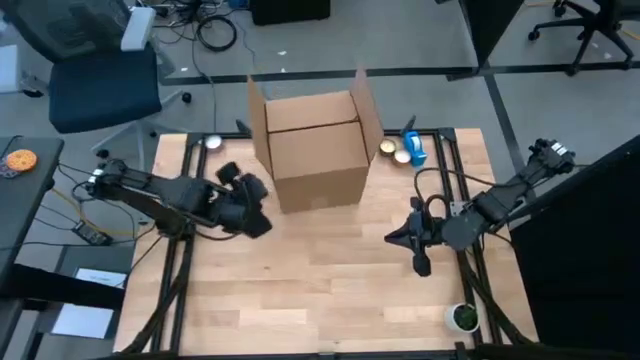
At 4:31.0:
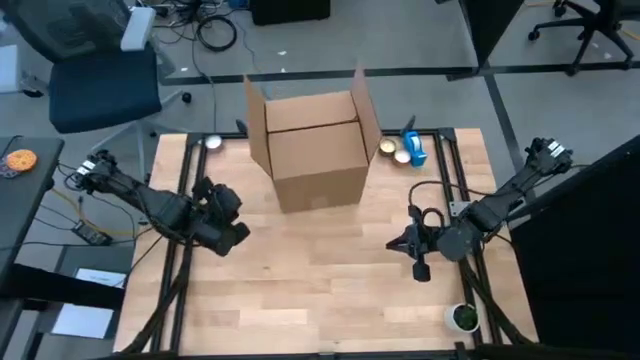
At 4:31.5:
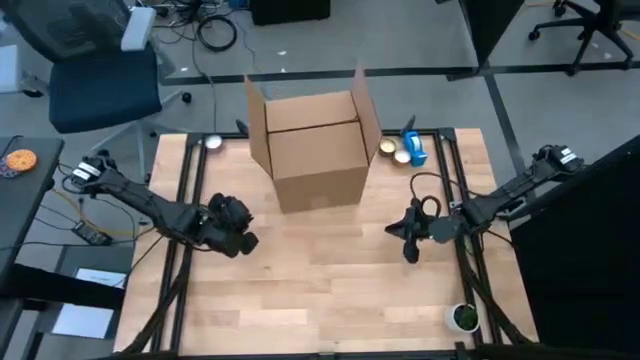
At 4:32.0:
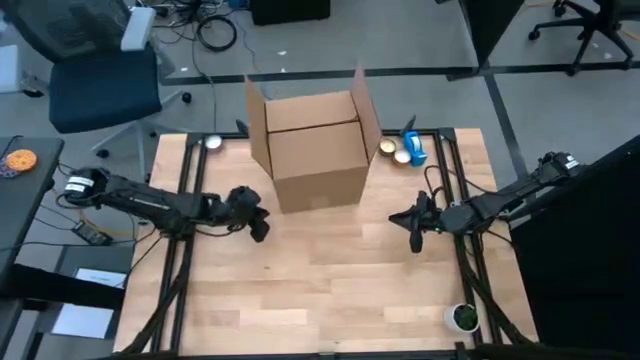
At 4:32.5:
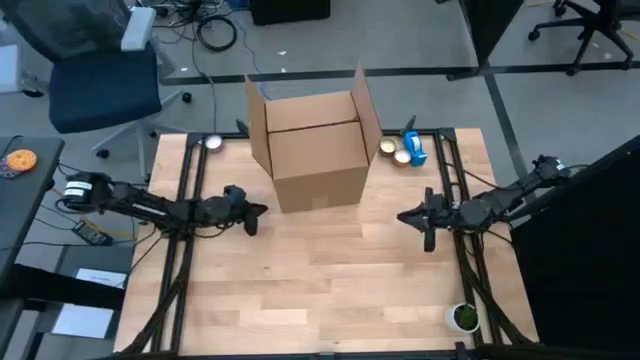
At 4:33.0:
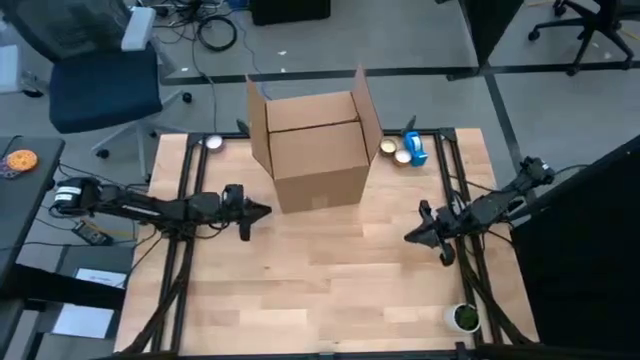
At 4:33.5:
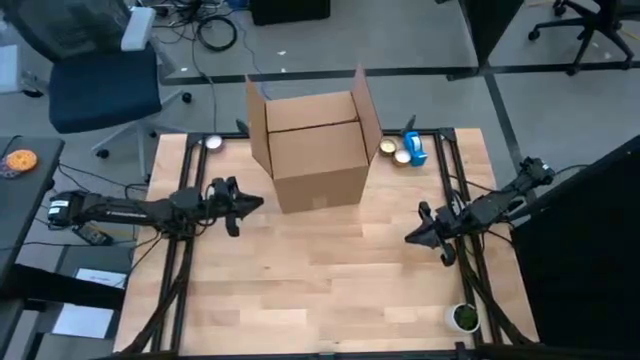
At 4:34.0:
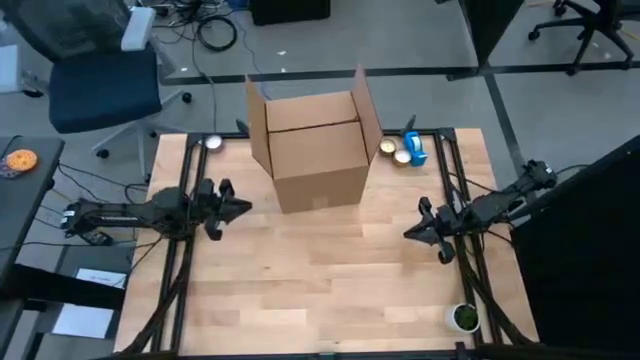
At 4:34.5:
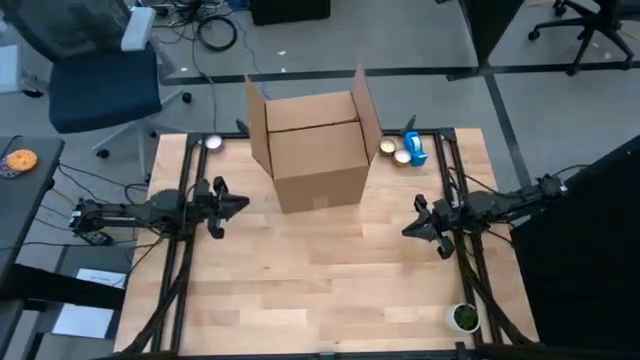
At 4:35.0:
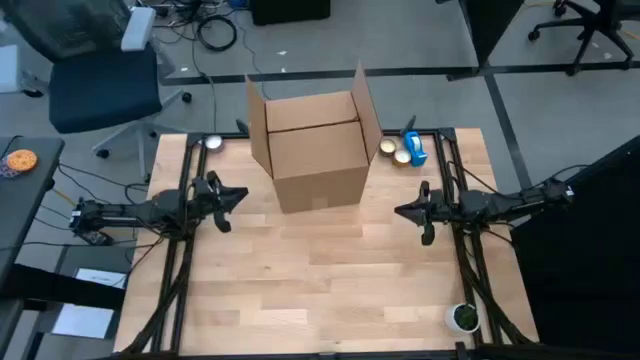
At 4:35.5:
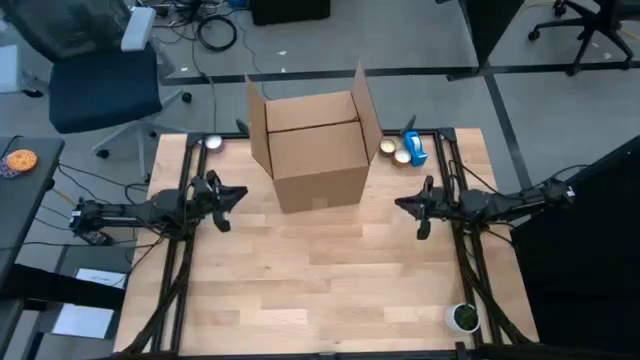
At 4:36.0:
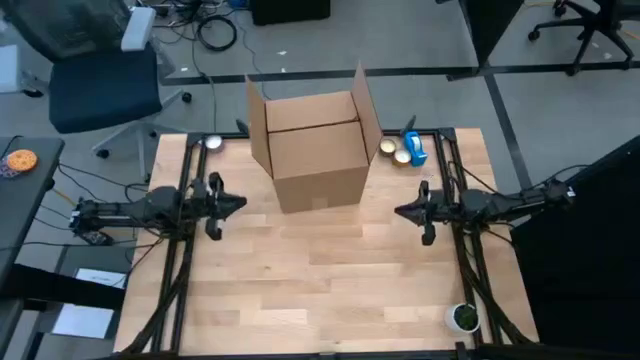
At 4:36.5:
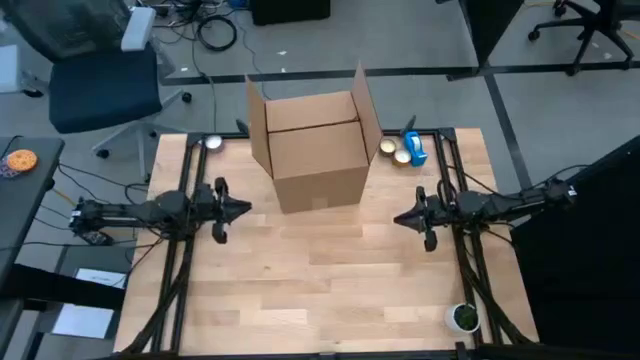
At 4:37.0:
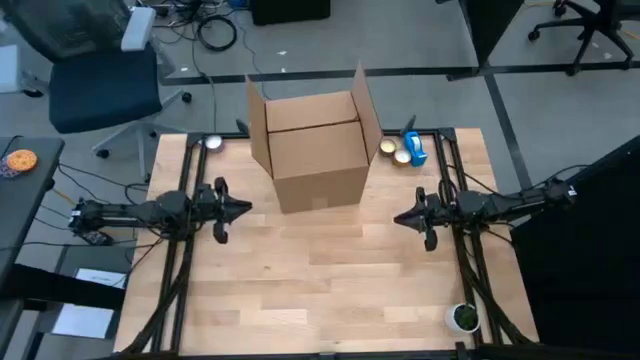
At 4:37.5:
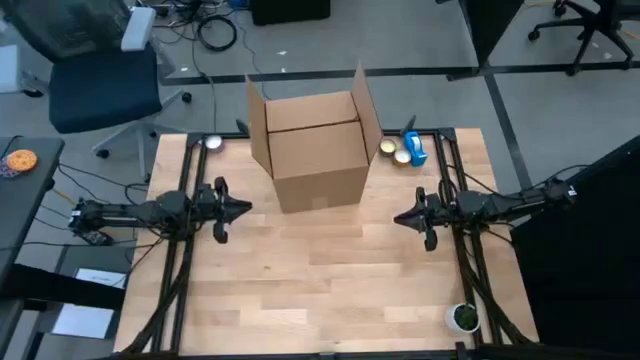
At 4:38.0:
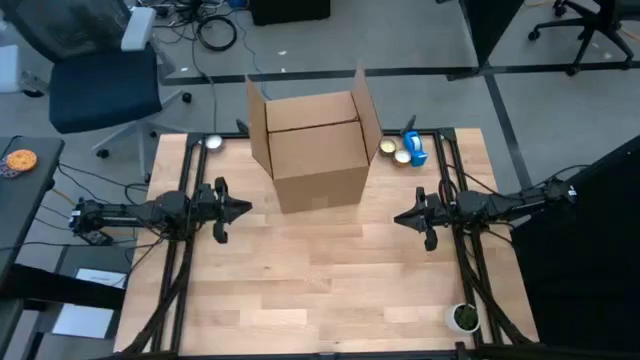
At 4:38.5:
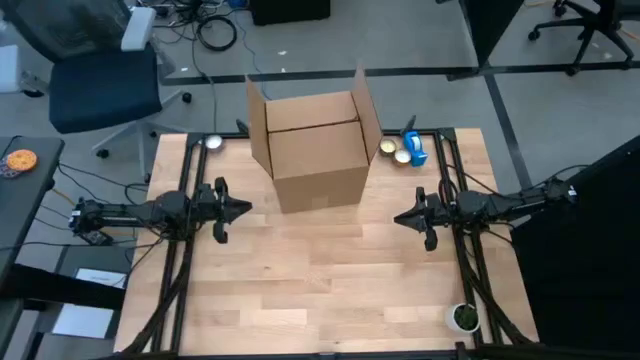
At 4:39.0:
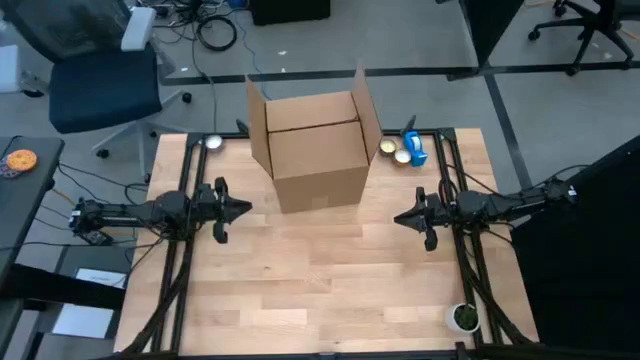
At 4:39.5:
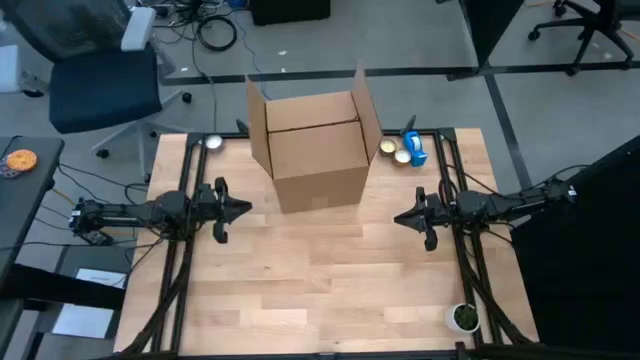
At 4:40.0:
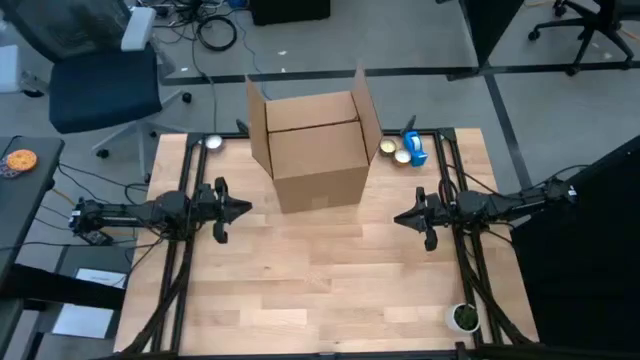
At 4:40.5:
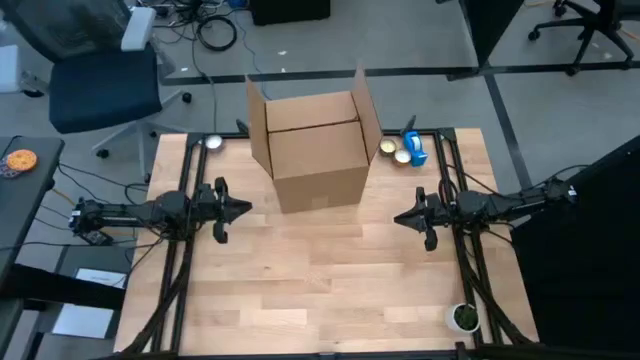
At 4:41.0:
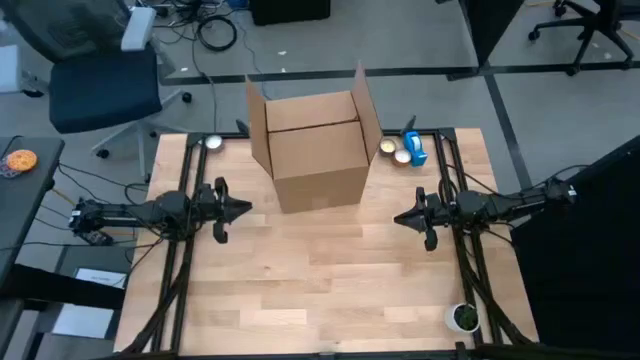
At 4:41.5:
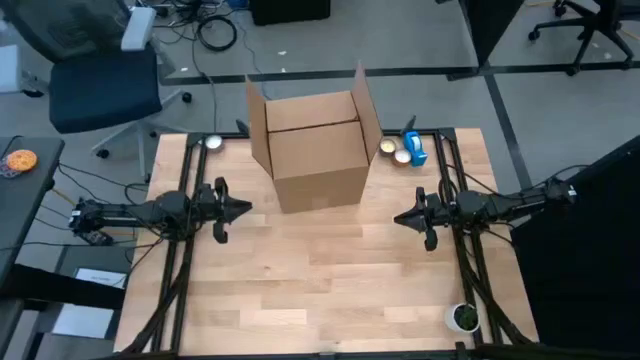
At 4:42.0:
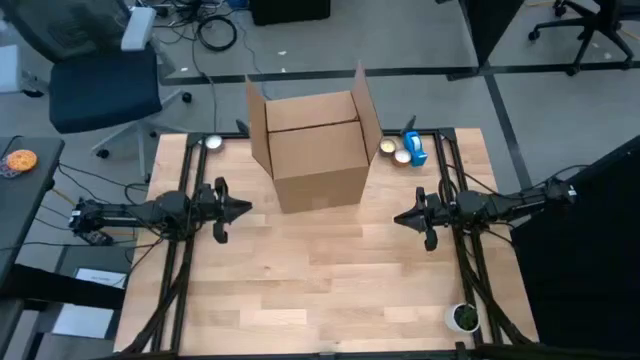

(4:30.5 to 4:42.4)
Task: wrap mug
Return to Home Position

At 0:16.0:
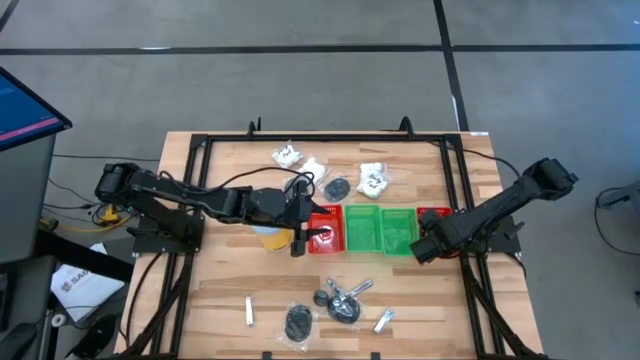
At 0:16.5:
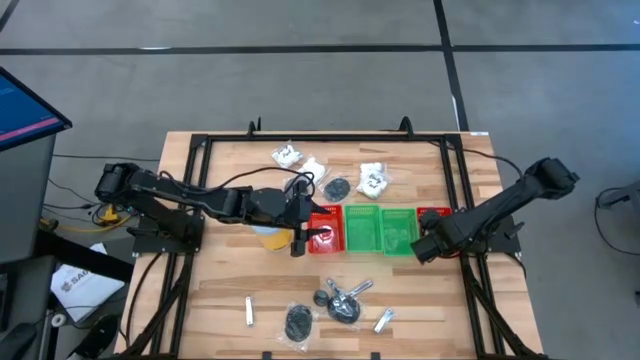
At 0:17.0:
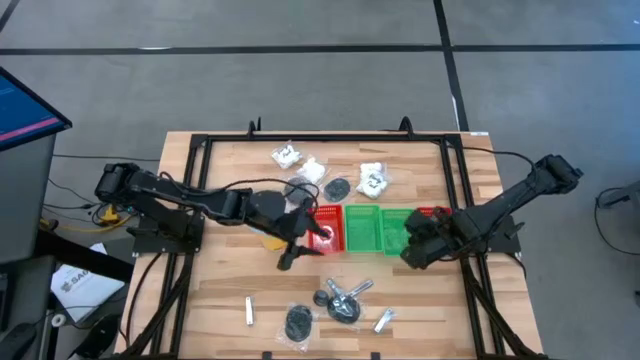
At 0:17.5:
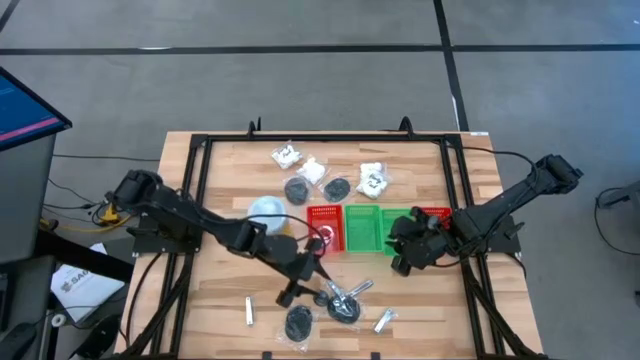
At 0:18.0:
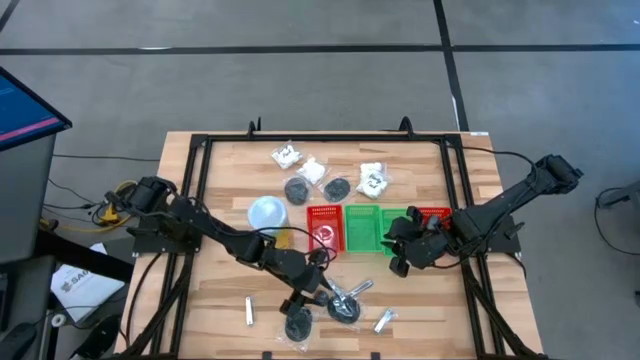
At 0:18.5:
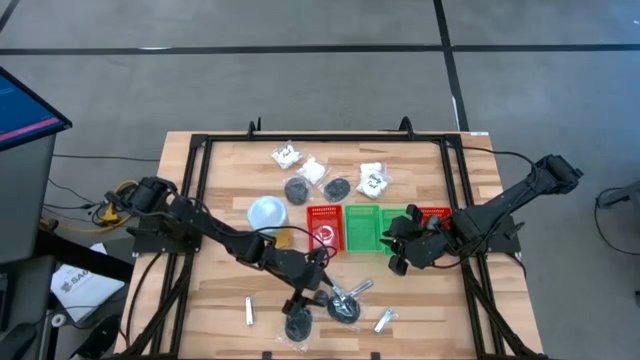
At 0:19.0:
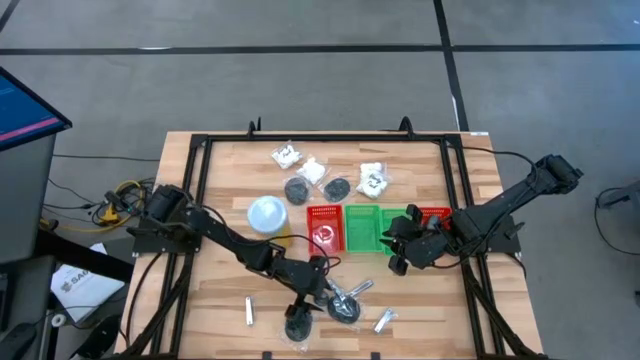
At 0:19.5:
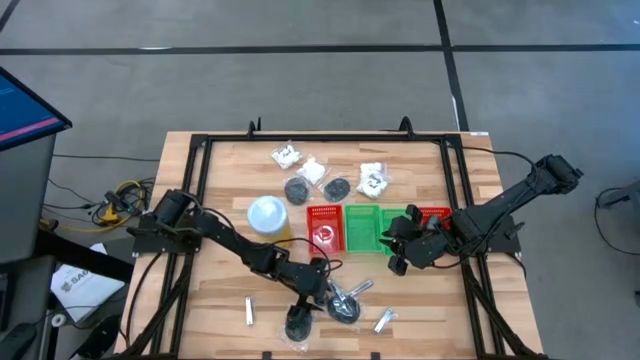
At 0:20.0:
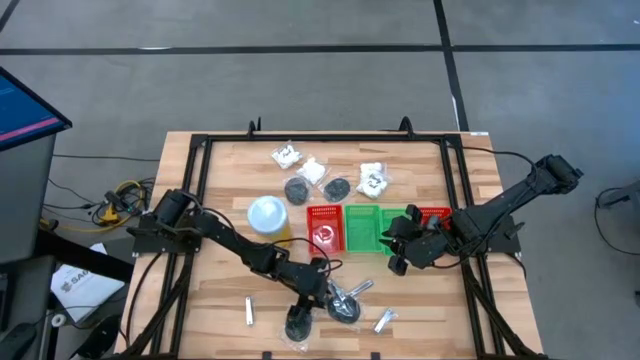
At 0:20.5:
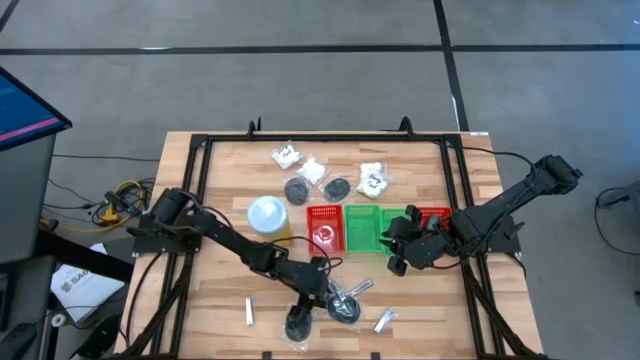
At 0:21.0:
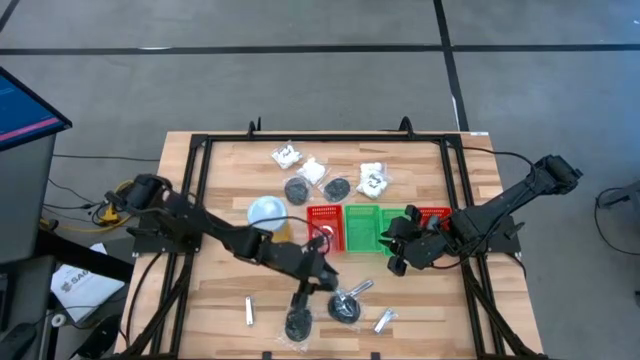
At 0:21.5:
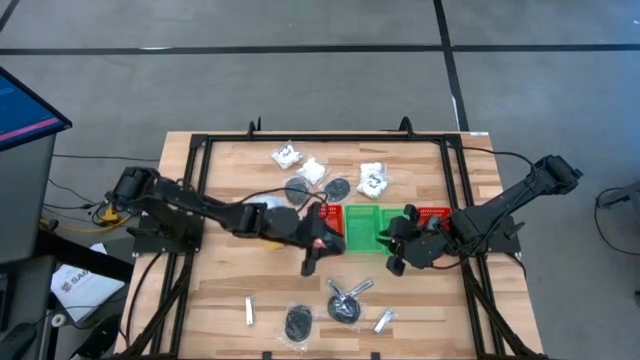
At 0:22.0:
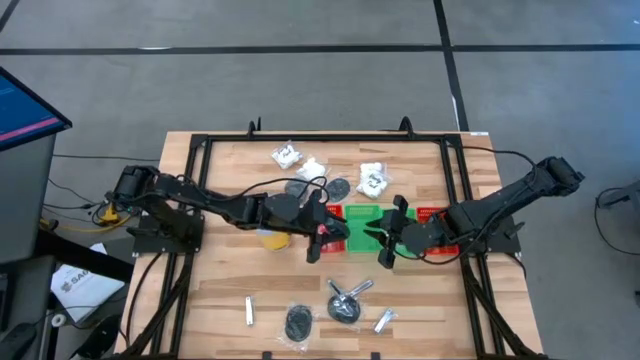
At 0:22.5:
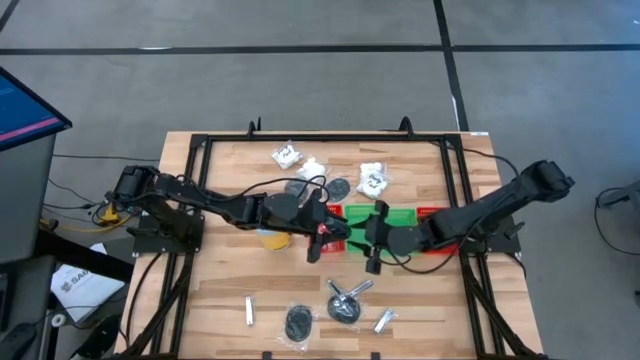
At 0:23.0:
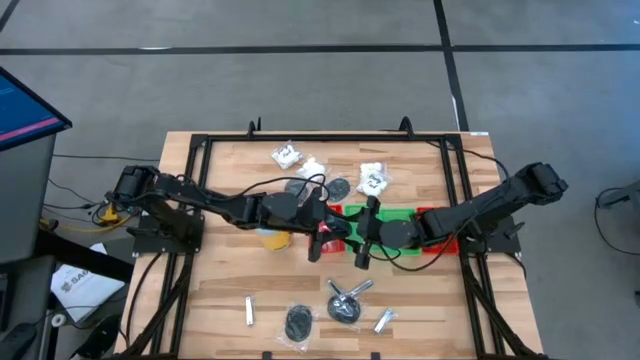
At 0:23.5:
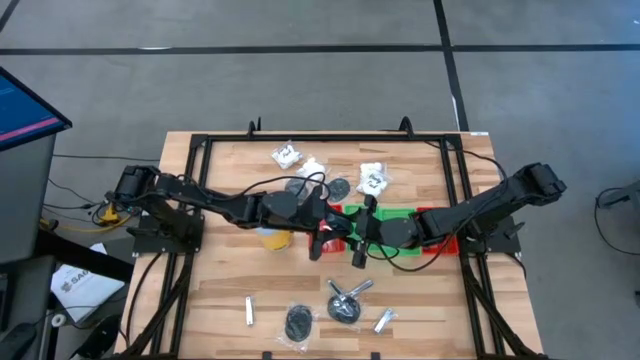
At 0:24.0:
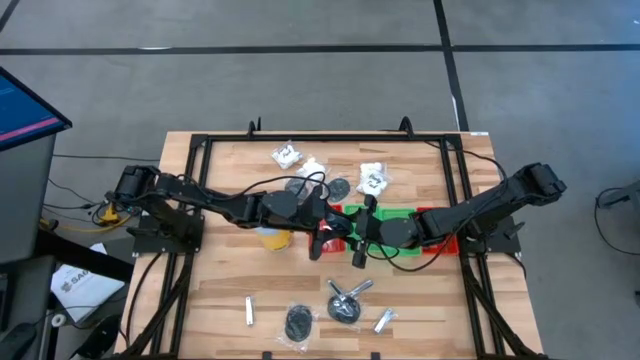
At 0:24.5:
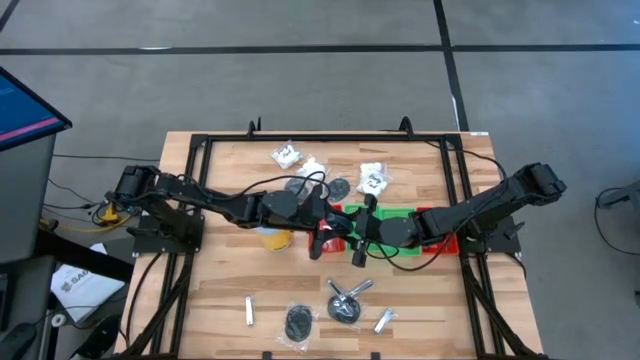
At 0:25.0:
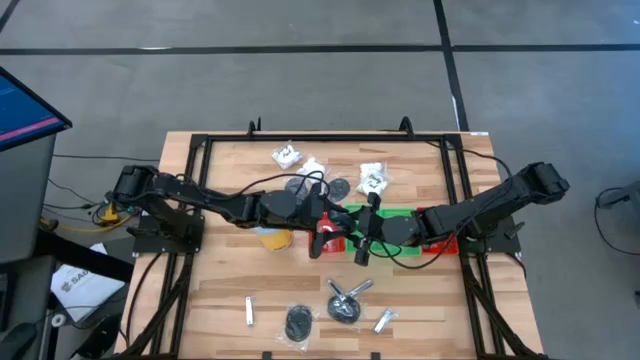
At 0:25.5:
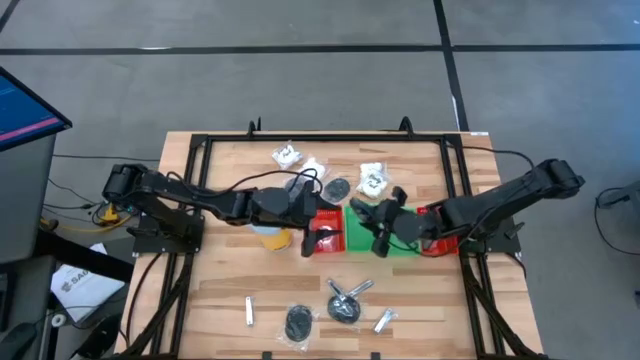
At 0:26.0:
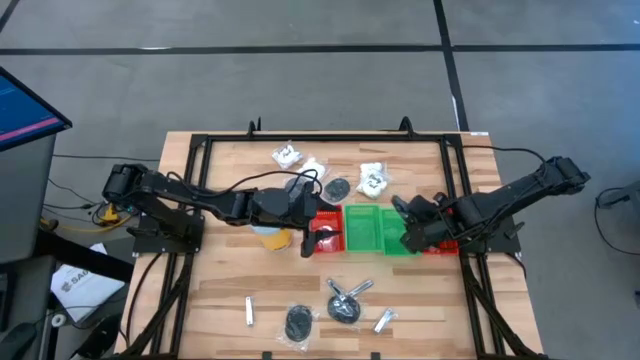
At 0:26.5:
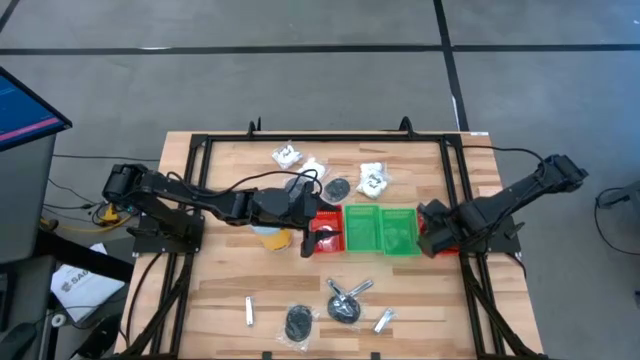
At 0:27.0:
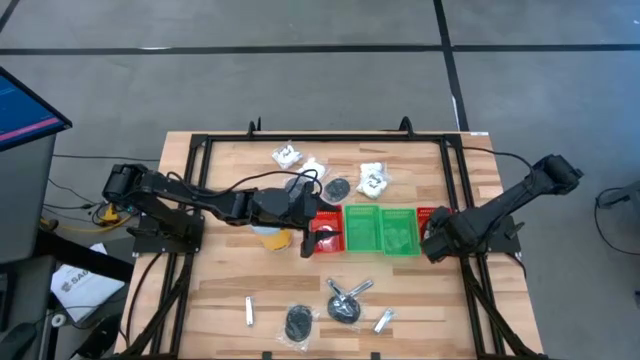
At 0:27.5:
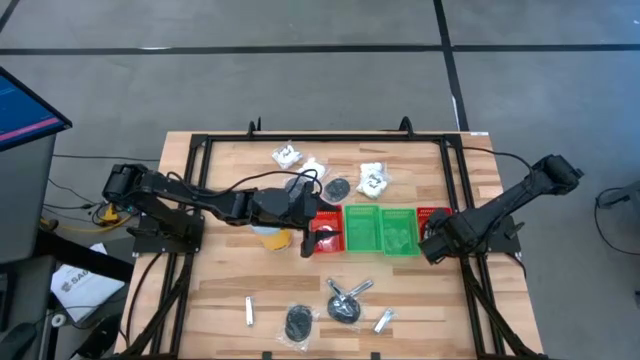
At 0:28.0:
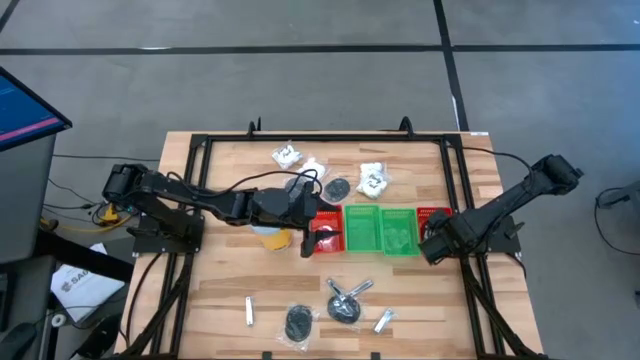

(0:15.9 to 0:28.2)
Task: Pick & Place Travel size toiletries
Put the black deodorant into the right red bin
